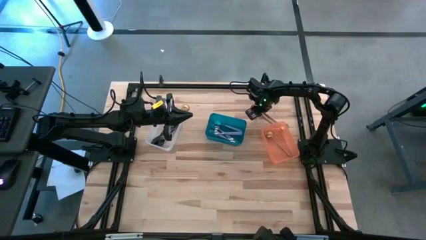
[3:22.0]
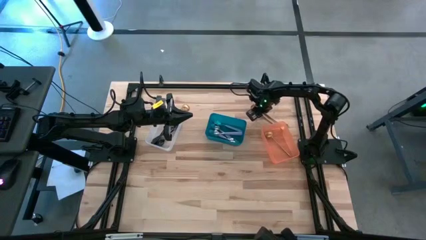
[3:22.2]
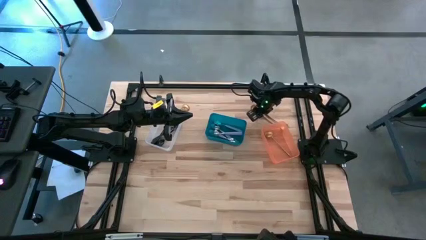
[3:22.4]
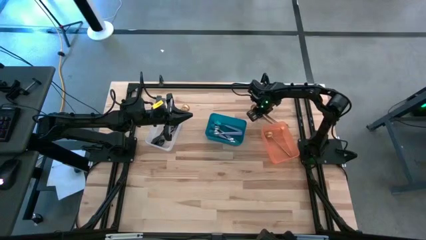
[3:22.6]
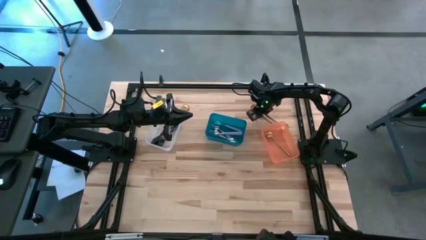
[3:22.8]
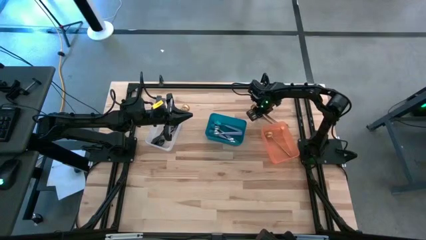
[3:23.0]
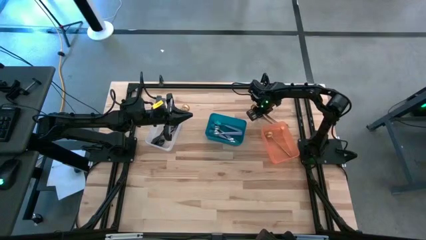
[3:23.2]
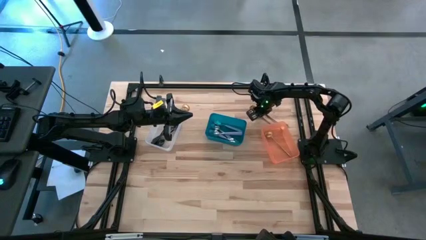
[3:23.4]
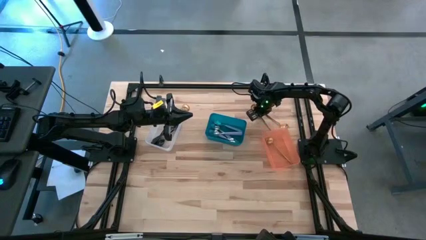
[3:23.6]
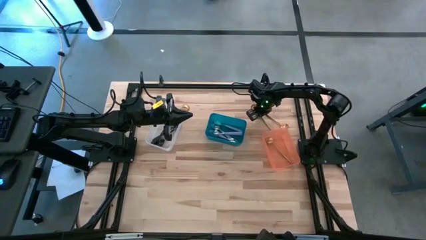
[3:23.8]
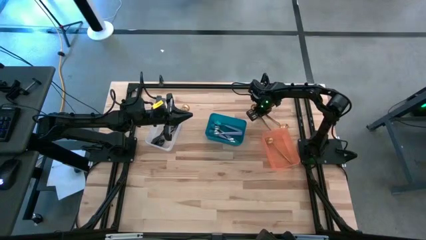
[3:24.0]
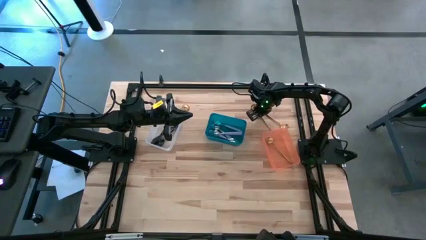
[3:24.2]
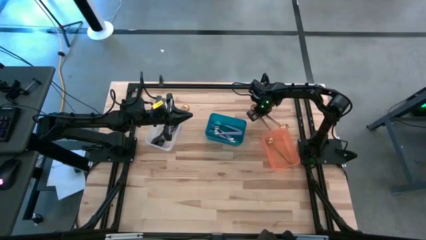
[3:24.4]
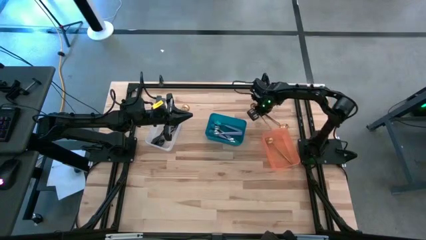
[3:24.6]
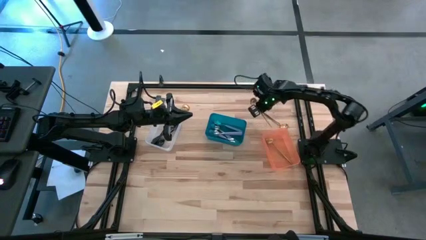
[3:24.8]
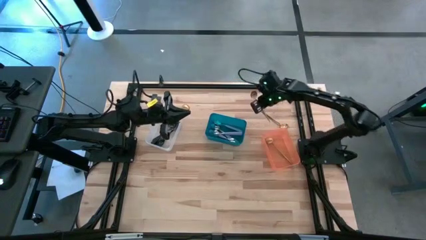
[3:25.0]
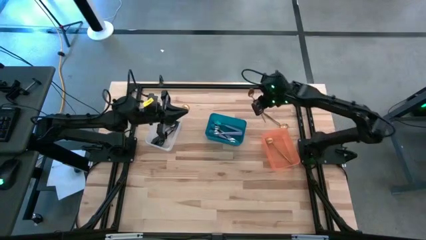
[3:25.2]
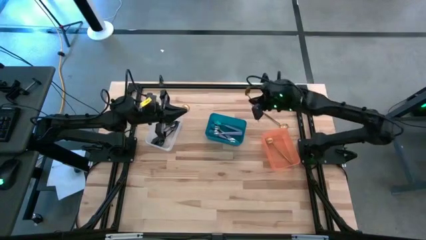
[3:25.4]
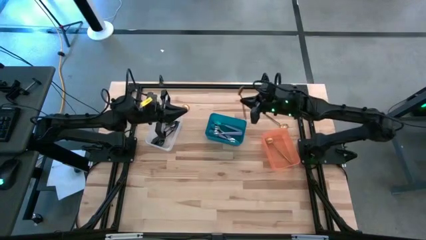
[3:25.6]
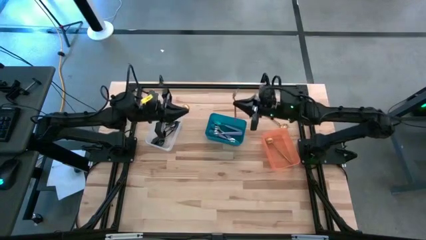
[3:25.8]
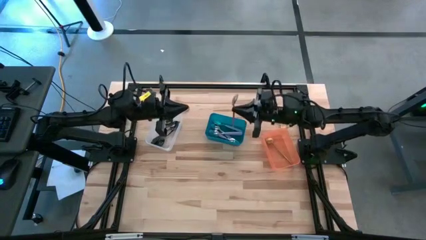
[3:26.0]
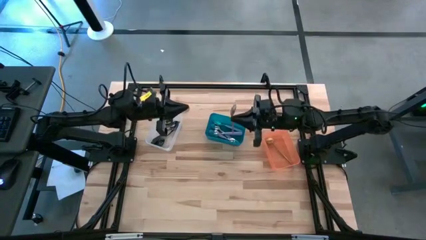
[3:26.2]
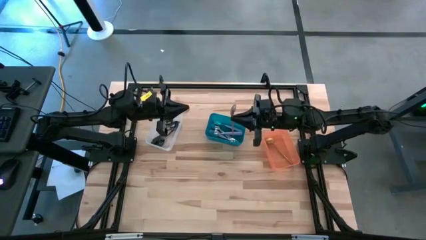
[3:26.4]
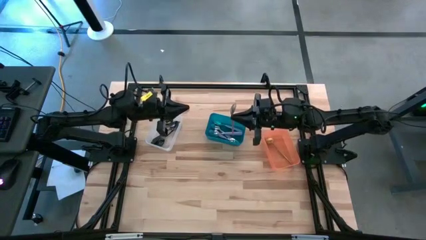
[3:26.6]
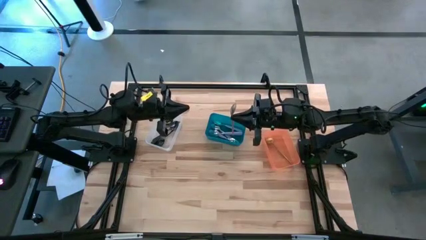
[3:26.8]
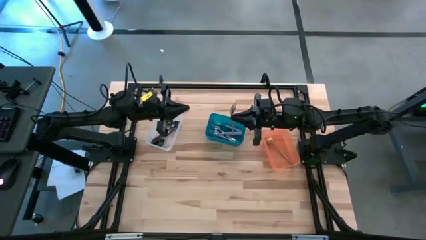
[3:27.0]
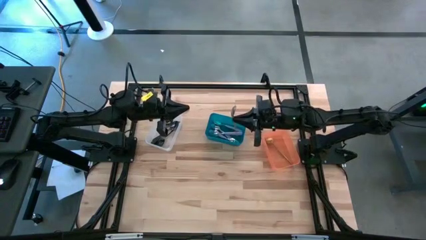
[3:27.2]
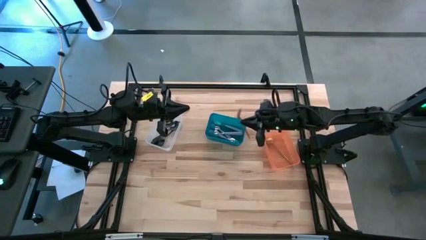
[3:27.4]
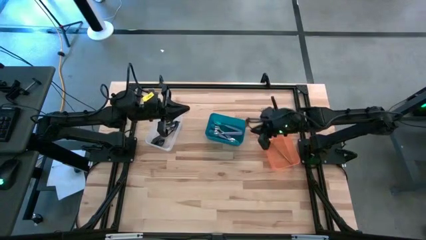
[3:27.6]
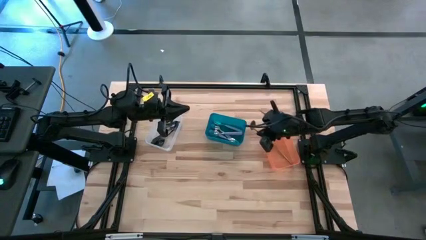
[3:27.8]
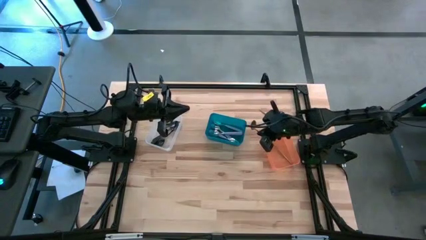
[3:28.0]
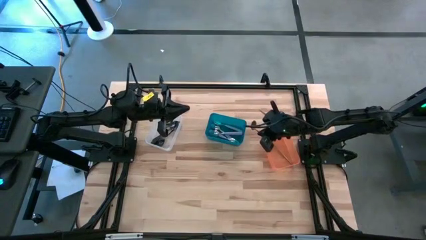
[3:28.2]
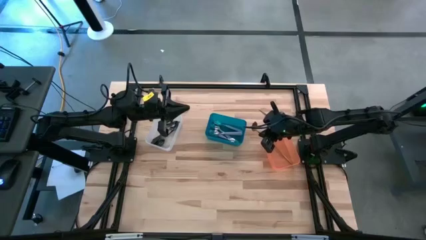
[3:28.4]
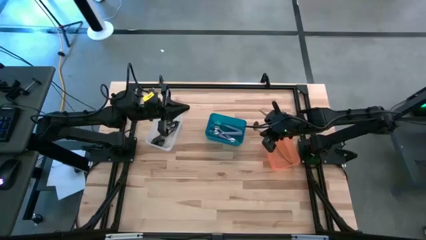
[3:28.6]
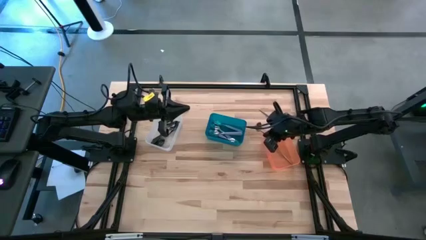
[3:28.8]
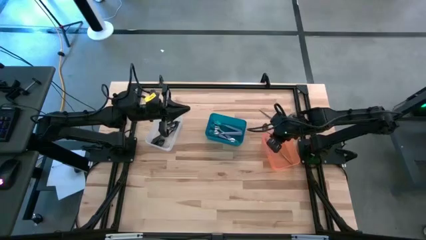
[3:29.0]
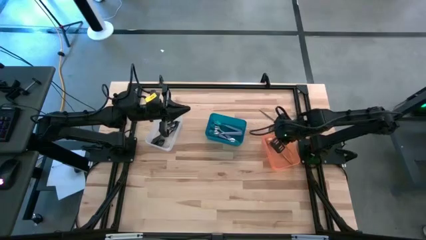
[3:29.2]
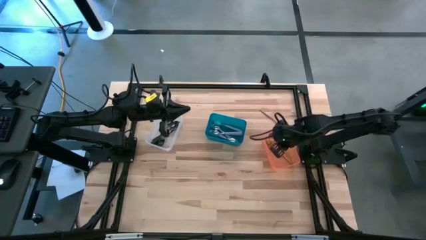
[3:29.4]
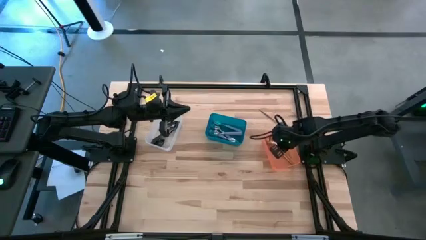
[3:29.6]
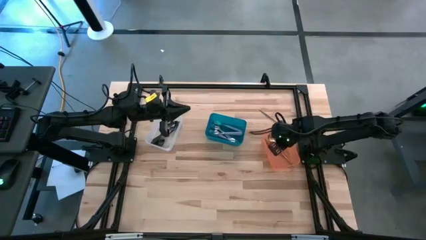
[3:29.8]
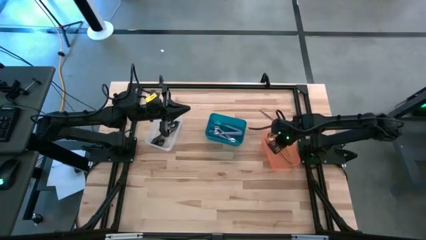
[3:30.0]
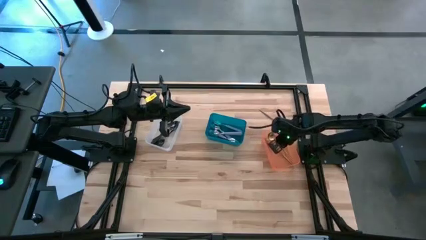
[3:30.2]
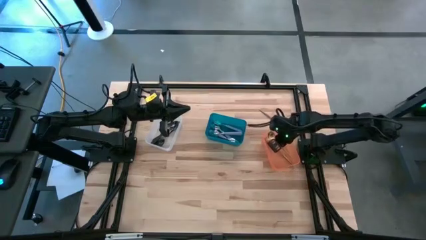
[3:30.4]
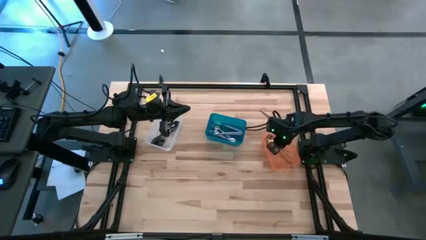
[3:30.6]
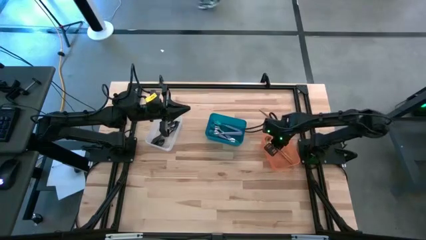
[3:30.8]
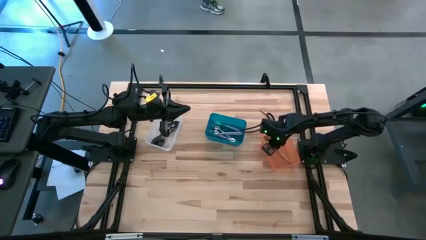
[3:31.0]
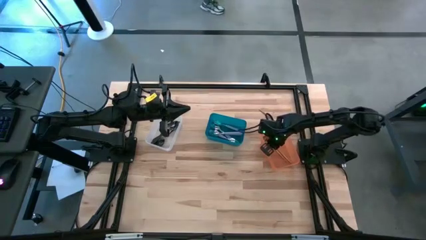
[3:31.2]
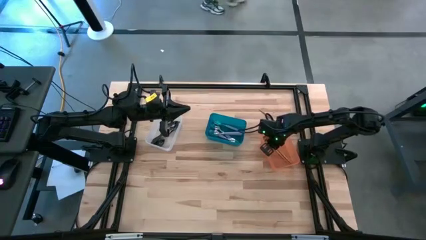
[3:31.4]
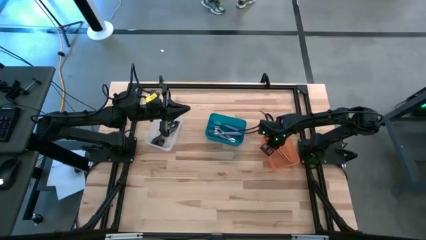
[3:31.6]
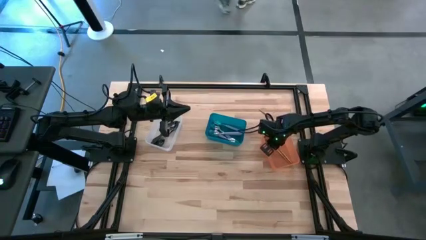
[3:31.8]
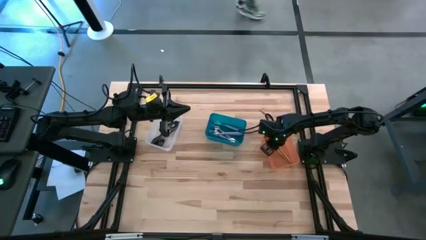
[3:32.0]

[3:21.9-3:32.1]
Task: Sort silverware by color (type)
Put the gold spoon into the orange bin
